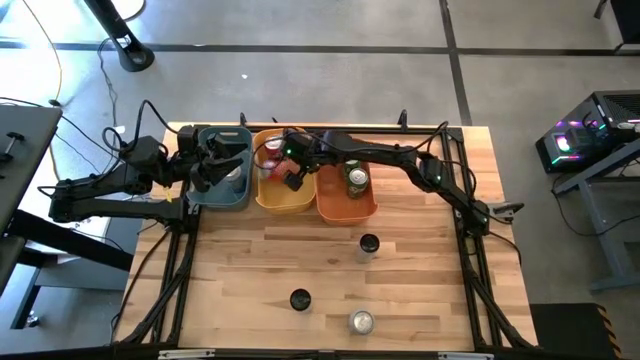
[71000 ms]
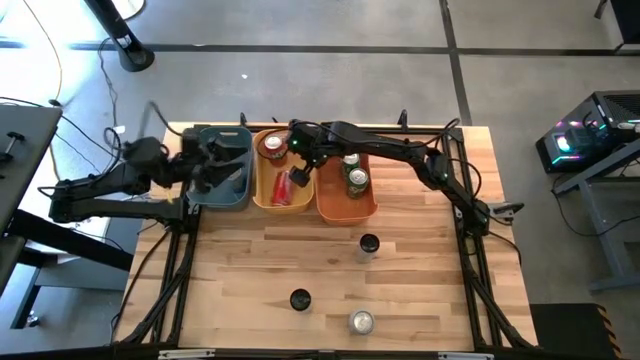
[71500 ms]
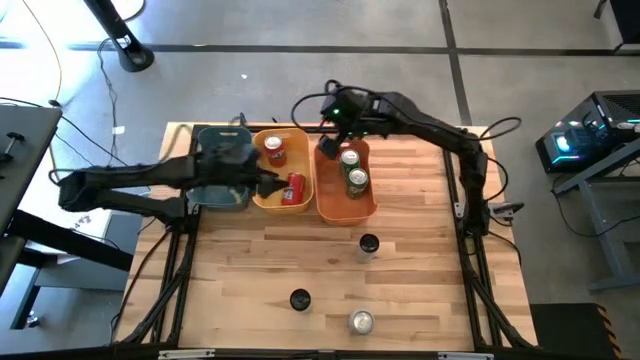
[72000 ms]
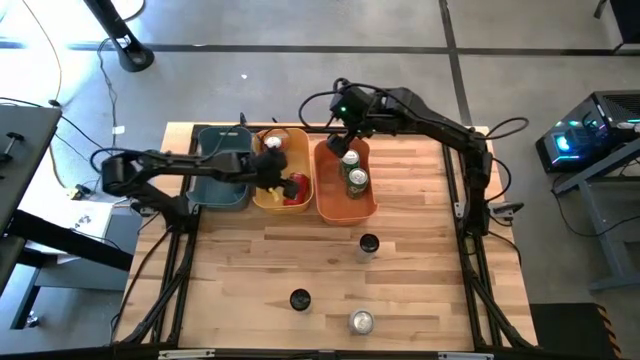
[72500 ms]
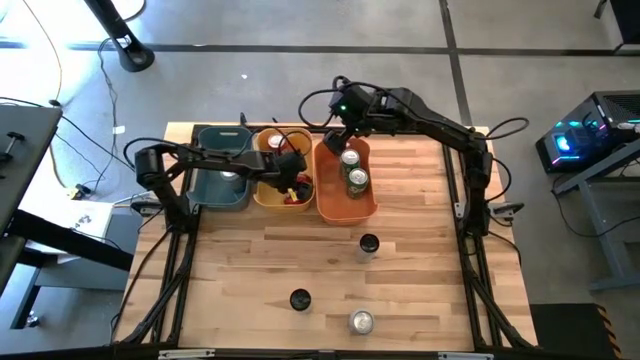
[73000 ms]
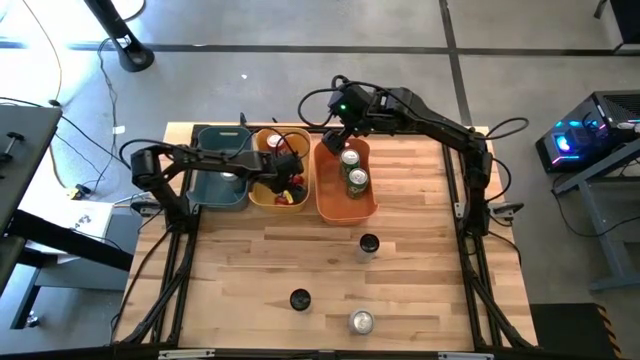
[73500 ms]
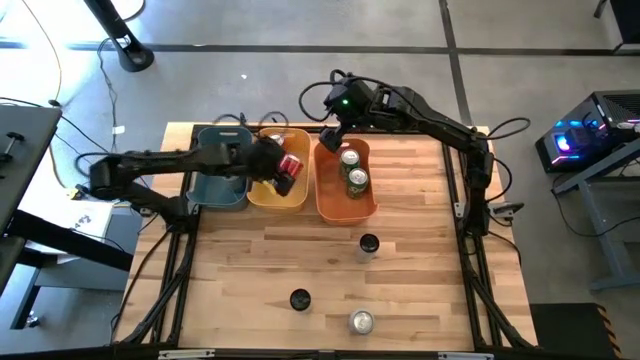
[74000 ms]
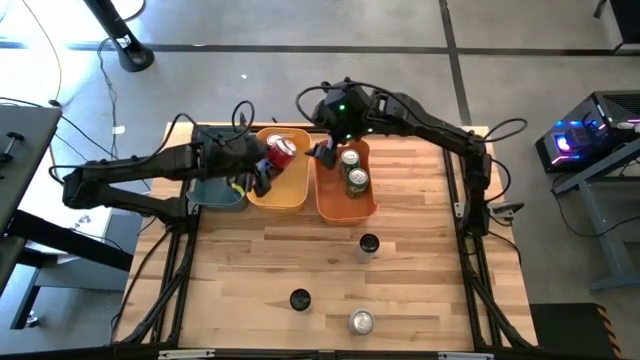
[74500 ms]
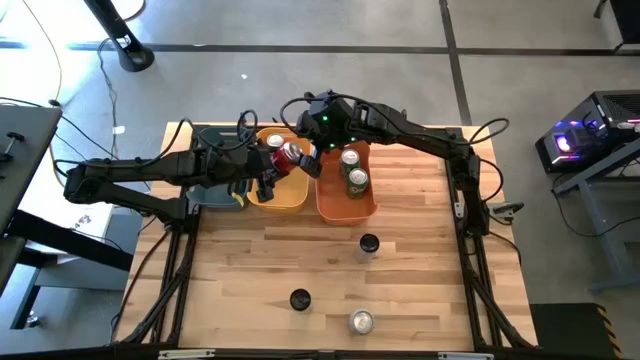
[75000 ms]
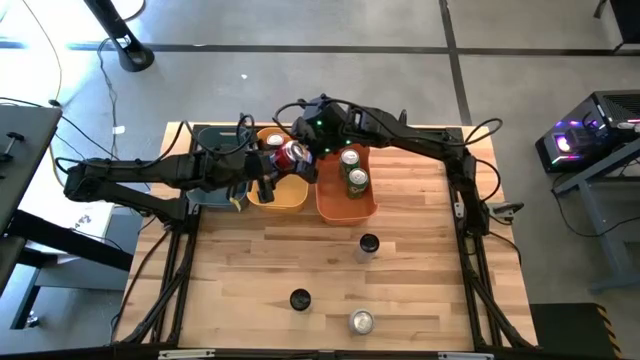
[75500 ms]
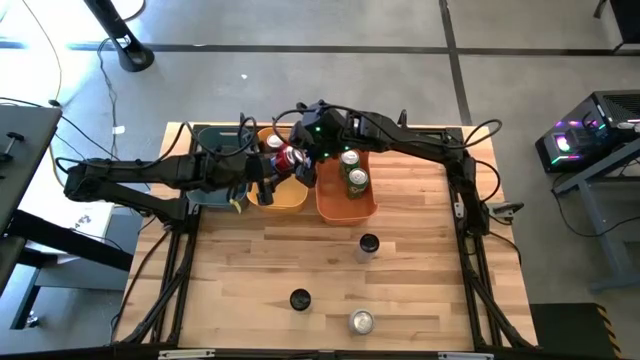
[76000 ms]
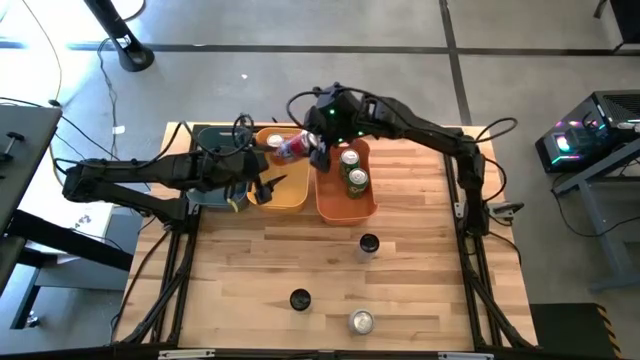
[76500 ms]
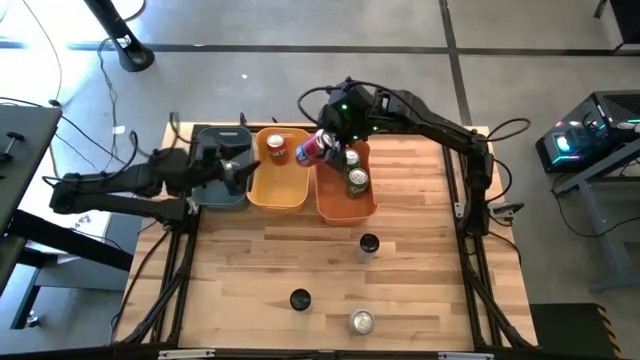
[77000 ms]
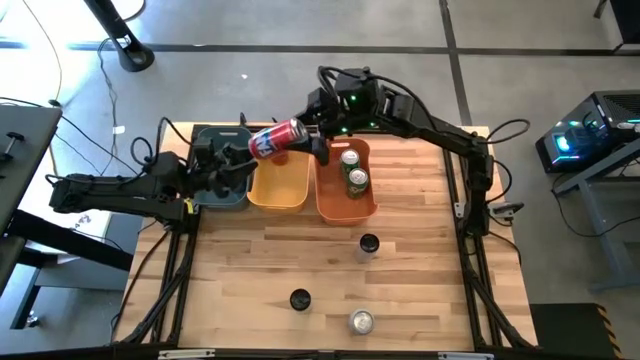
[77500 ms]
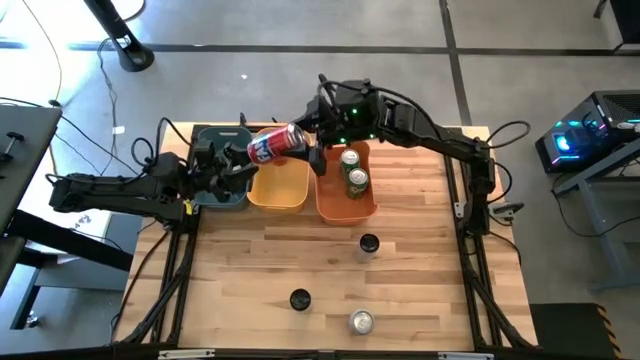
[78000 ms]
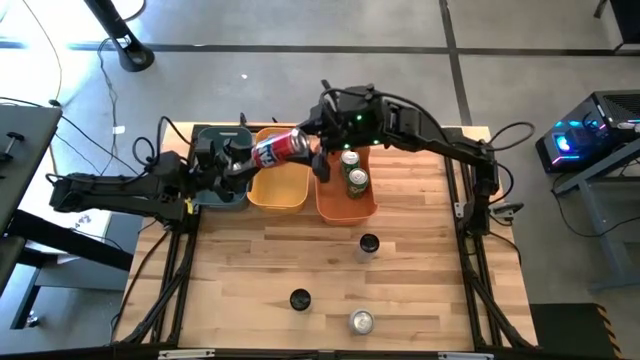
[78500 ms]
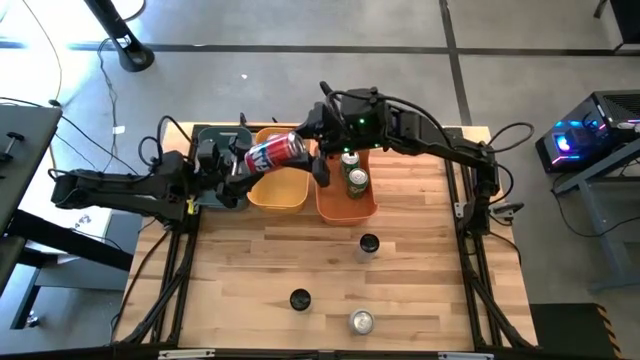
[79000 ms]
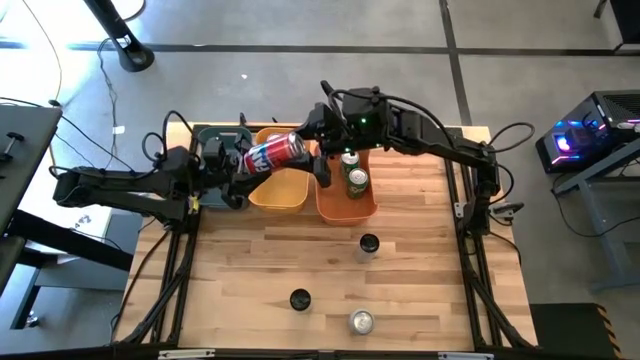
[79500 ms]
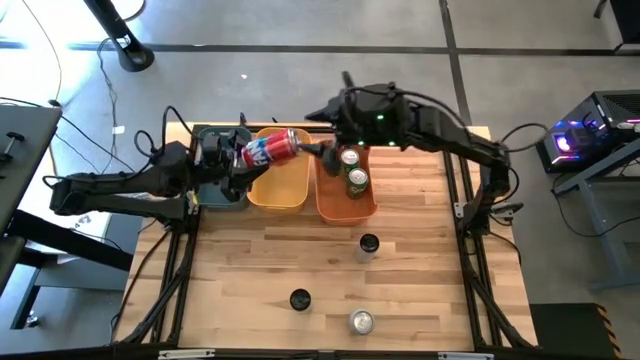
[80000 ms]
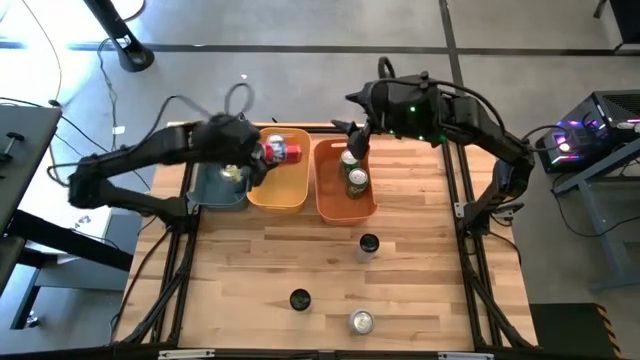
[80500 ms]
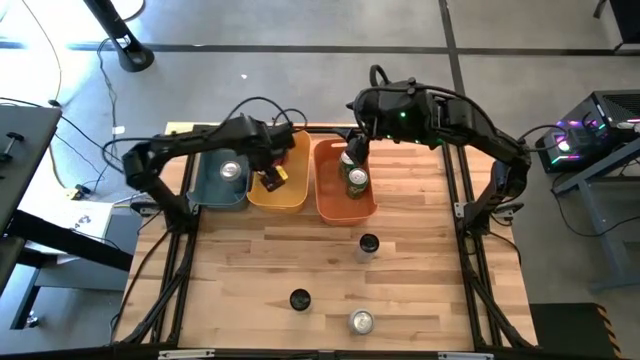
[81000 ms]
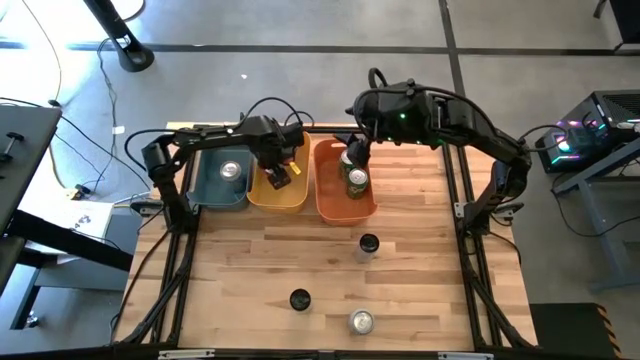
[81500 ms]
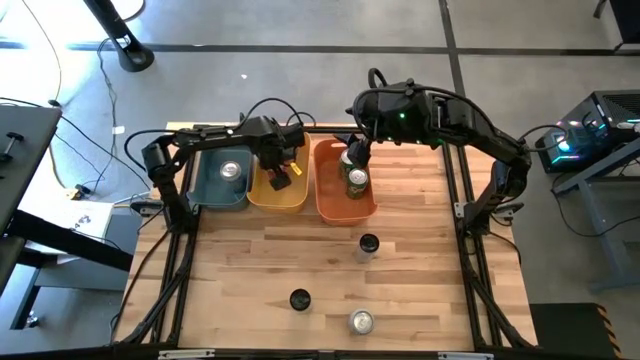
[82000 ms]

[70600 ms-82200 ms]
Task: Sort soda cans
Put the orange soda can into the yellow bin

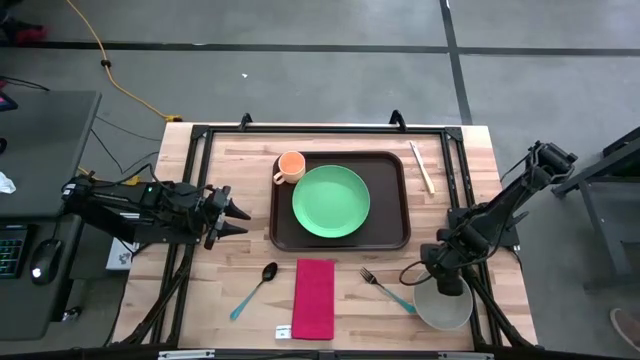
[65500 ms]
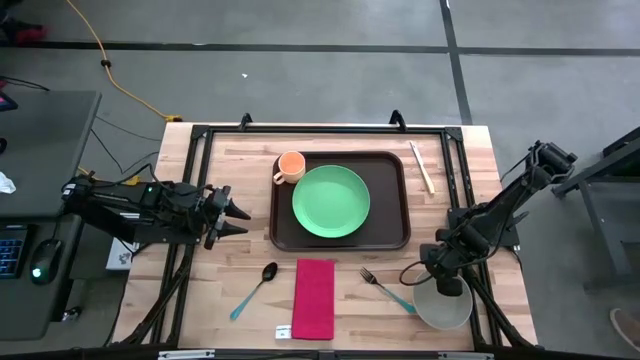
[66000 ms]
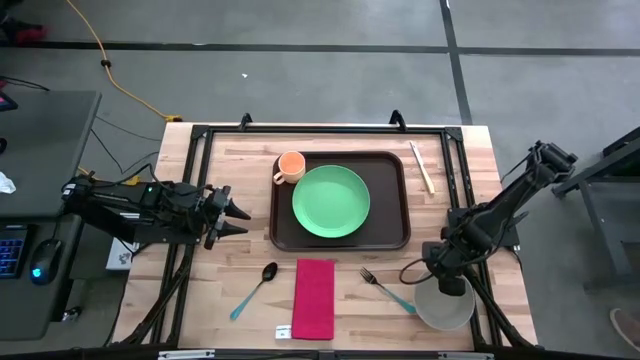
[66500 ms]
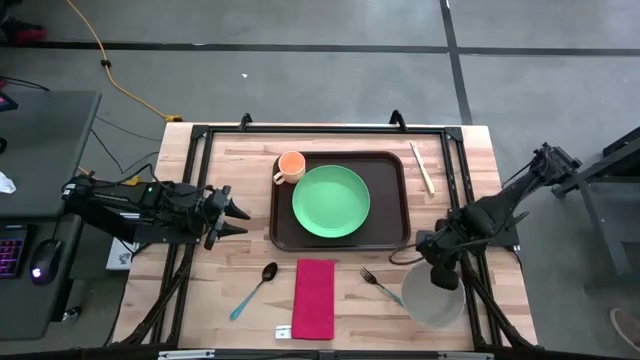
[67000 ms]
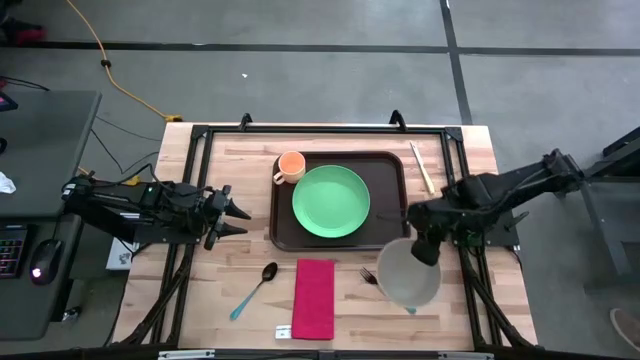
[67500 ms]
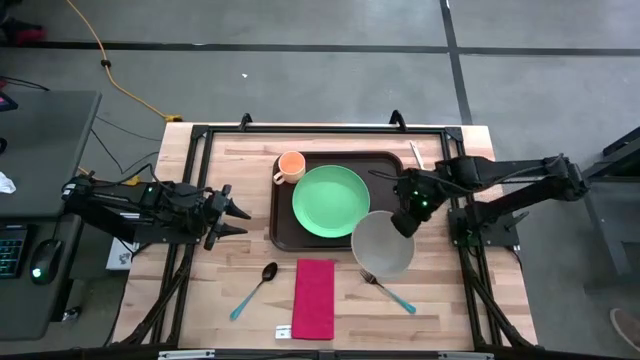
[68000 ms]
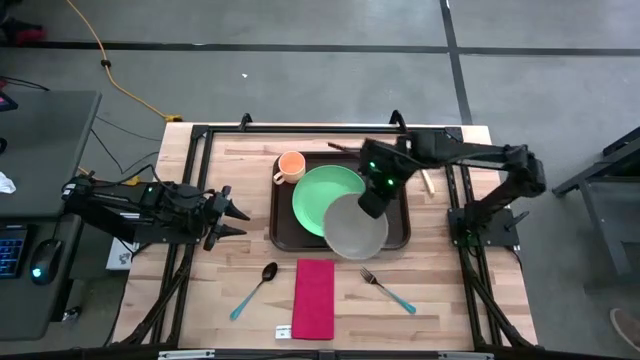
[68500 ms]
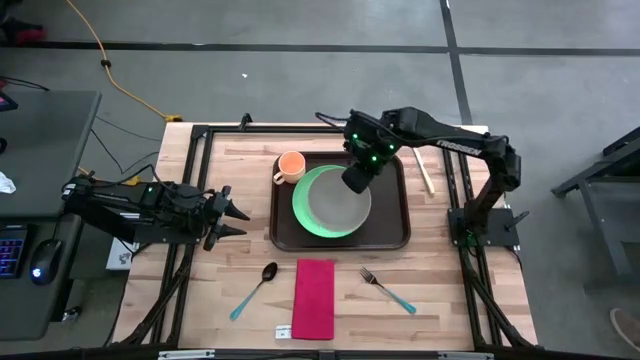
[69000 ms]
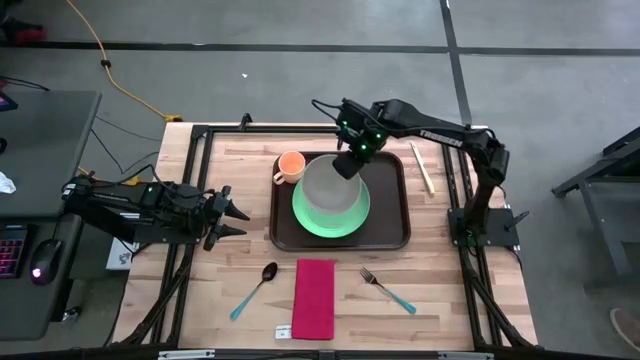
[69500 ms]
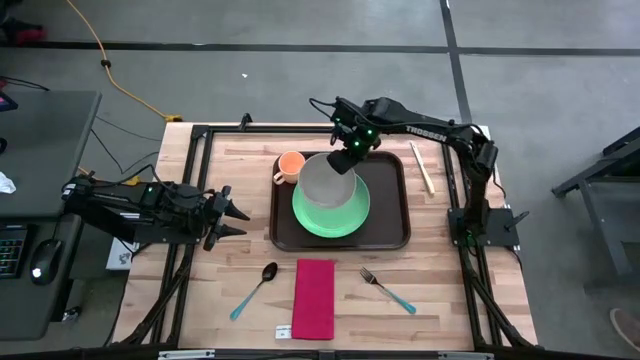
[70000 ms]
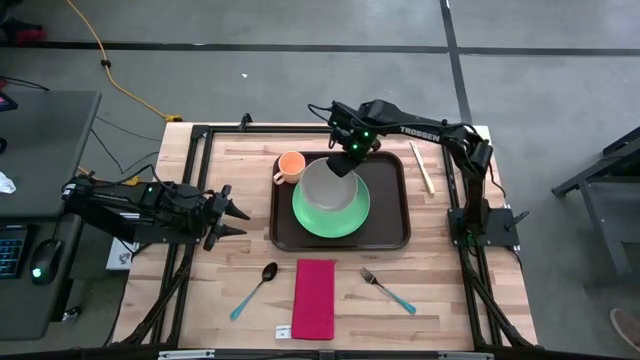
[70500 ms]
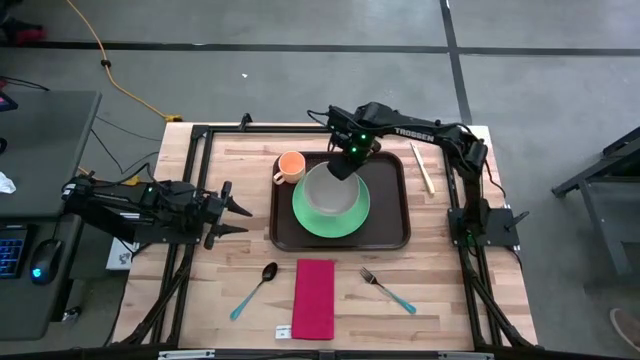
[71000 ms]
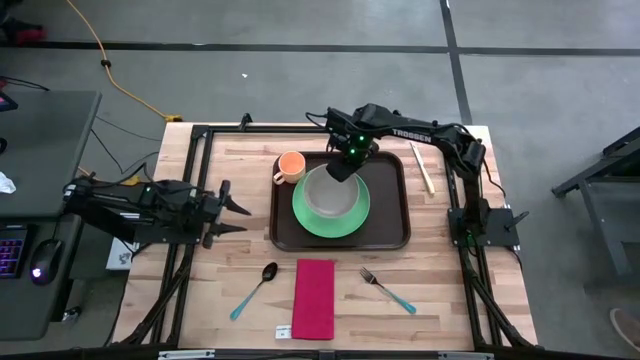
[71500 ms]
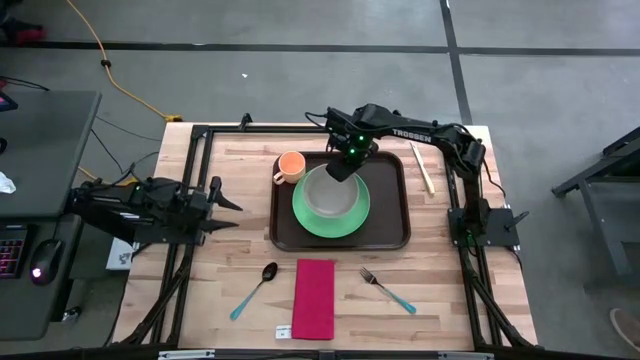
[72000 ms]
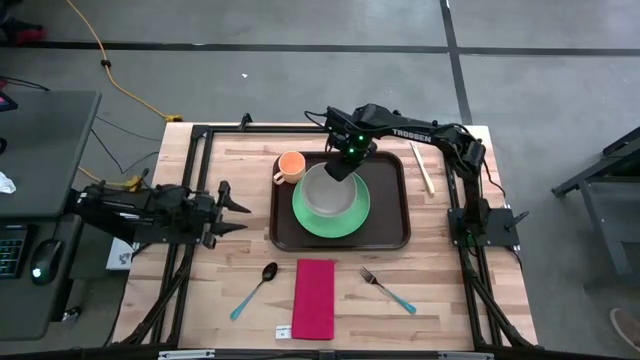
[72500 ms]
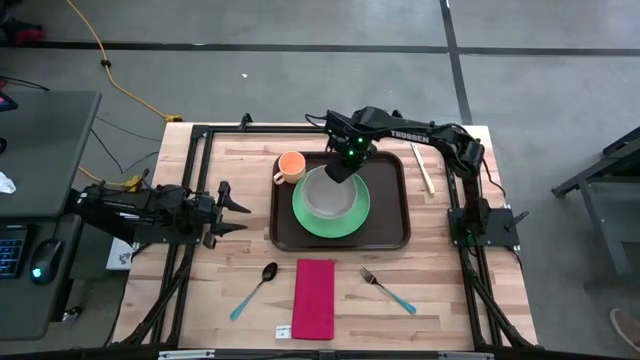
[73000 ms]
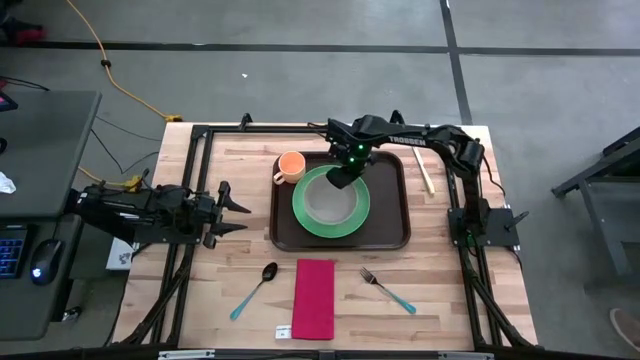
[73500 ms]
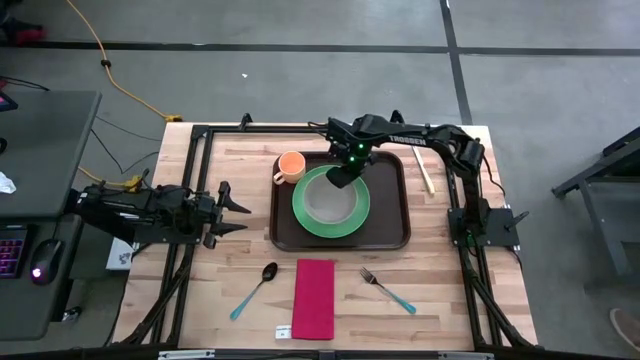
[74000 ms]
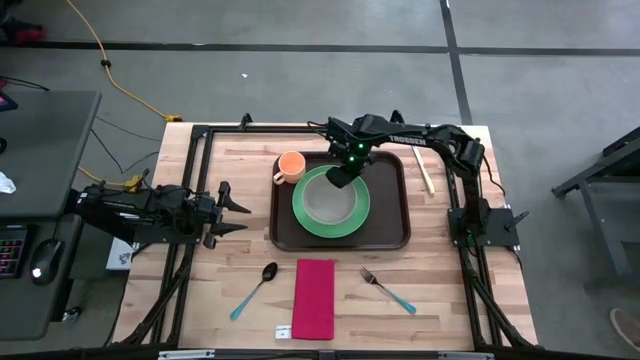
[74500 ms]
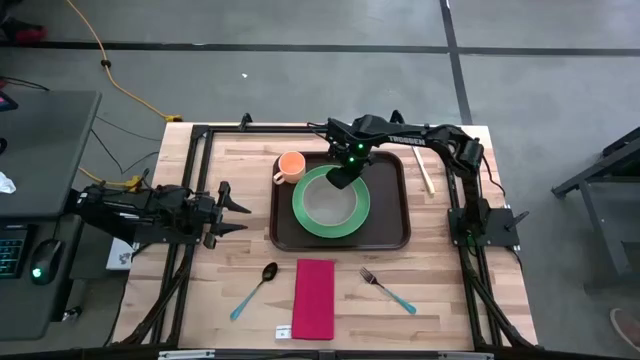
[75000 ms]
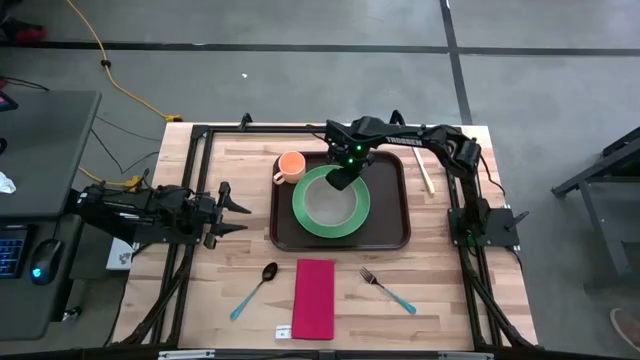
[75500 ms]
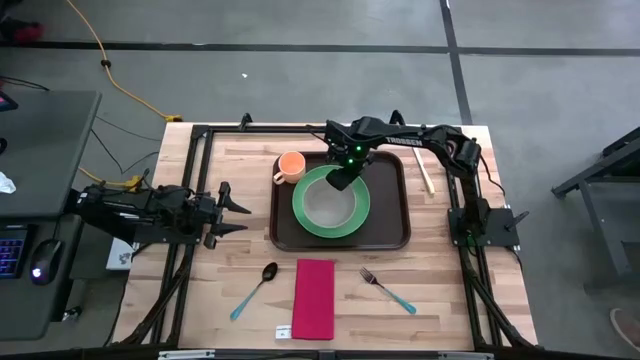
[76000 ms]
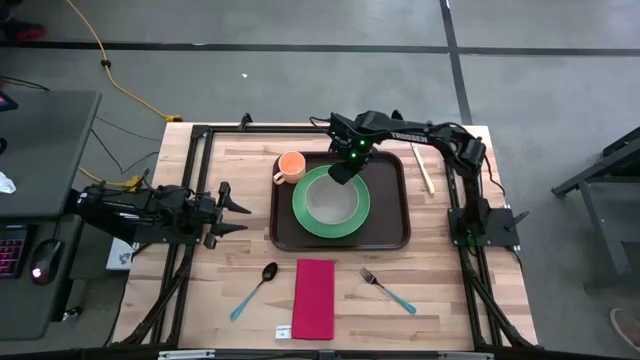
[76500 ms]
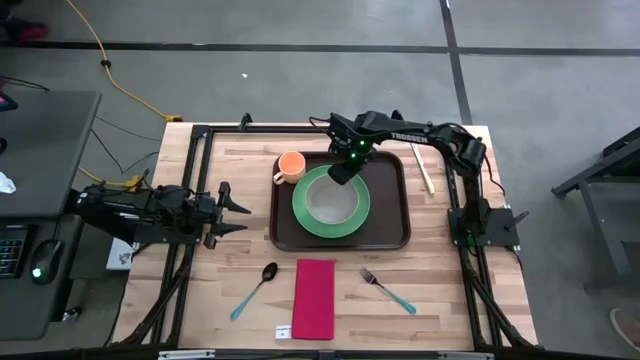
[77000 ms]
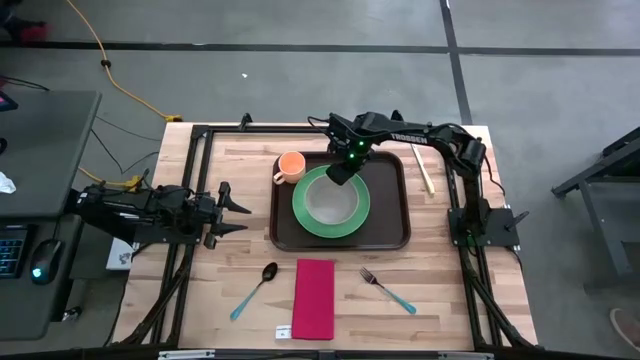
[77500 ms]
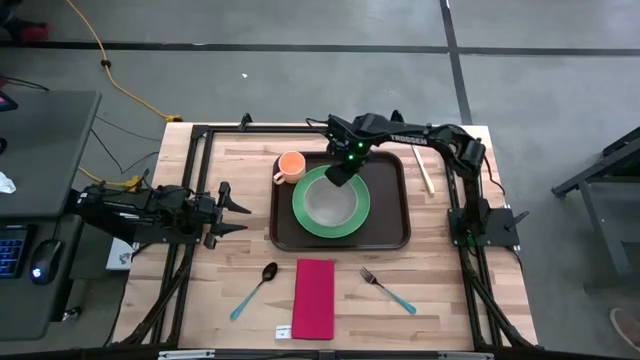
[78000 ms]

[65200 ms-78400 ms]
Task: Set up tray
Put the gray bowl on the green plate
